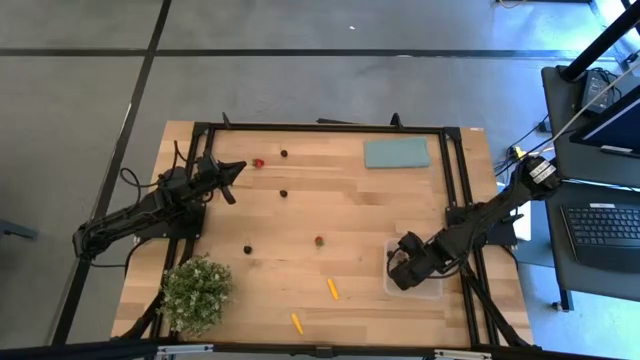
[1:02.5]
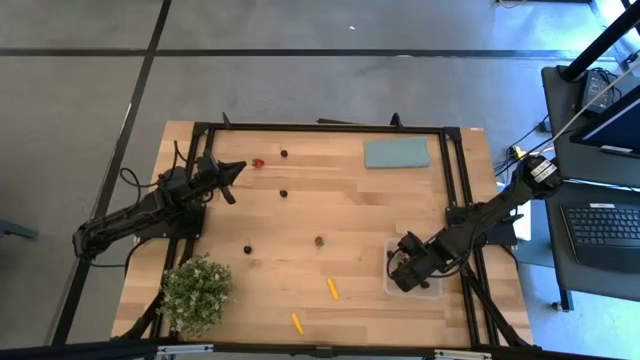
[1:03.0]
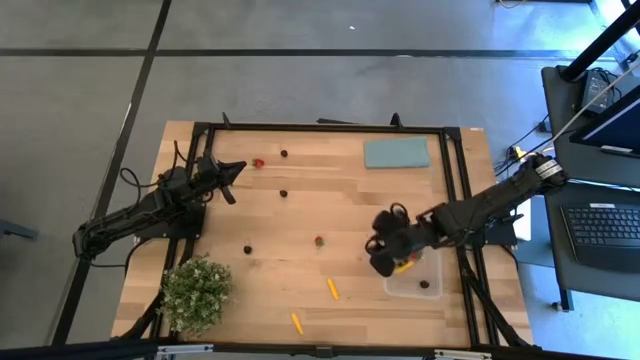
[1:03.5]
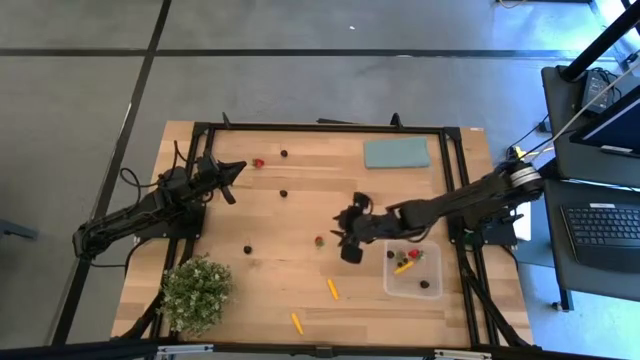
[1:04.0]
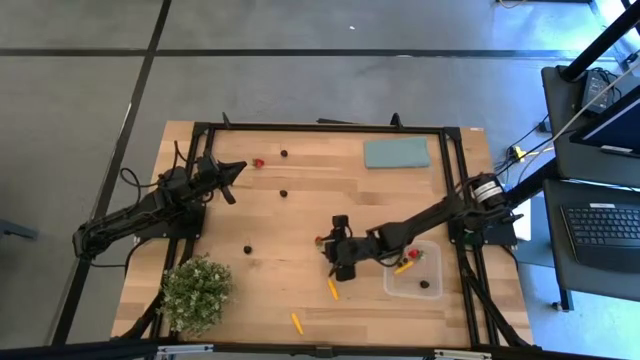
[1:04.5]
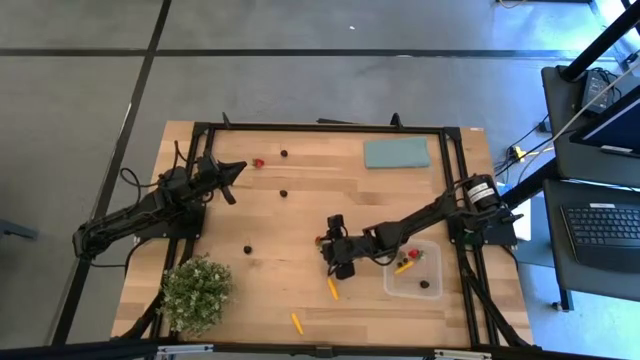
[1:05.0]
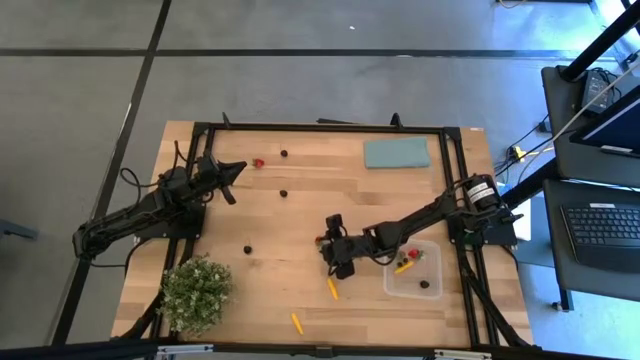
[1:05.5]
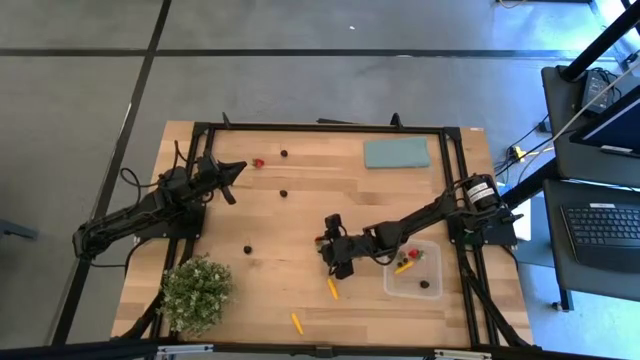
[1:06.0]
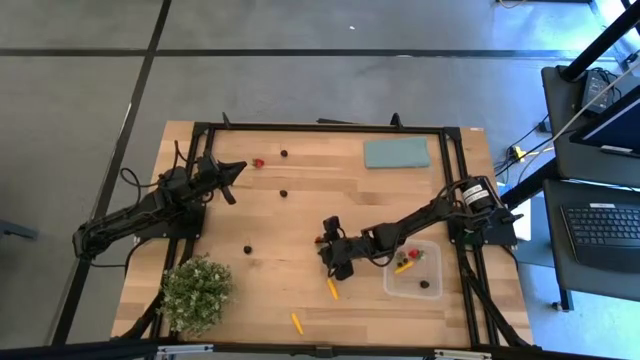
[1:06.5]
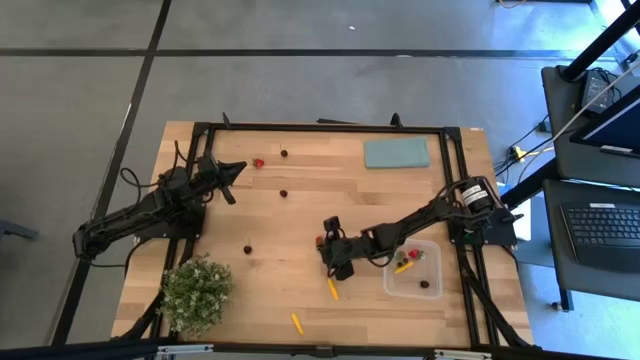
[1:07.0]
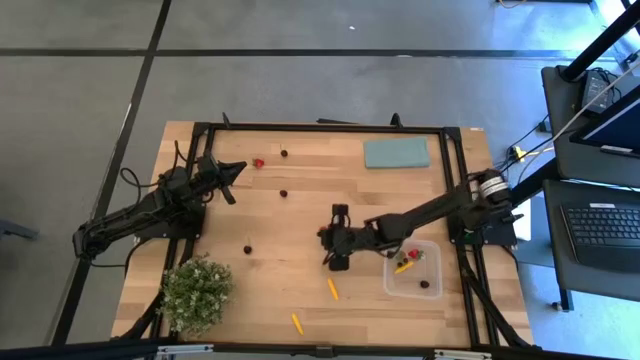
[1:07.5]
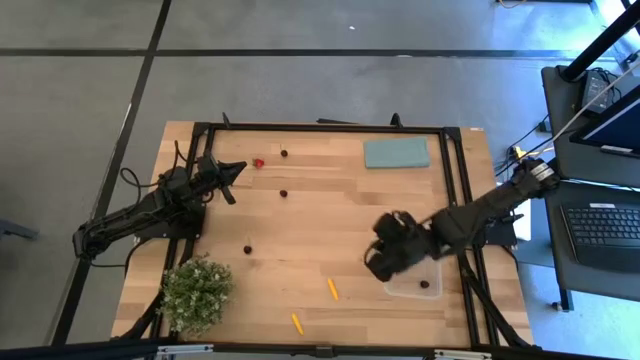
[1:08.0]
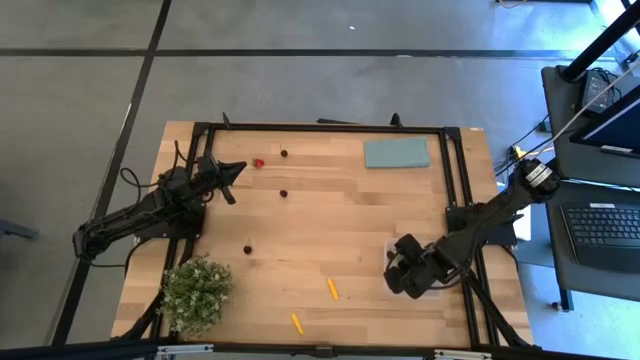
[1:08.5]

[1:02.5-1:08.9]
Task: Pick and placing Produce into tupperware
Put the bottom strawberry into the container

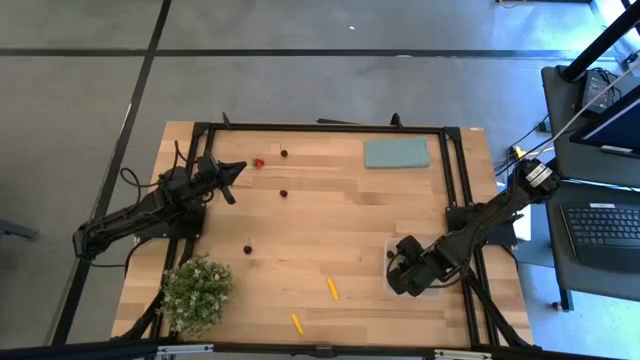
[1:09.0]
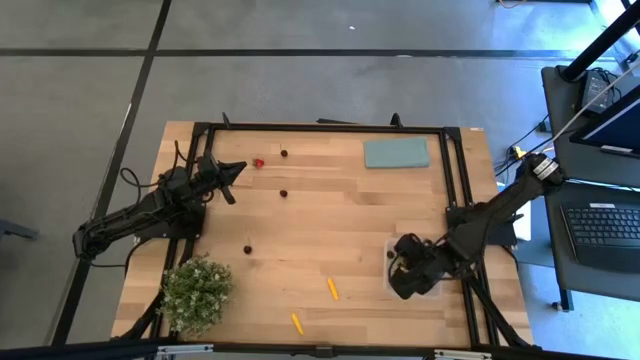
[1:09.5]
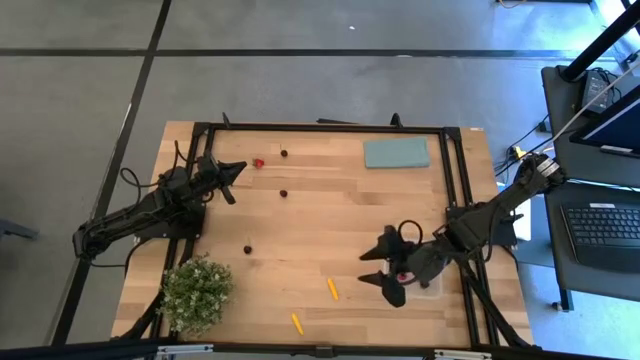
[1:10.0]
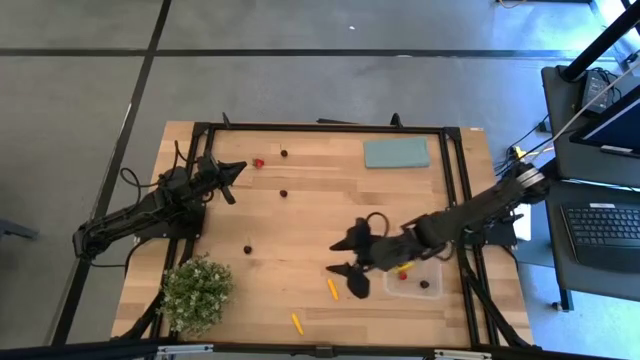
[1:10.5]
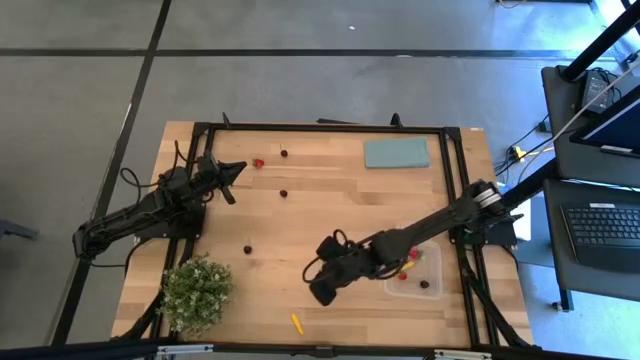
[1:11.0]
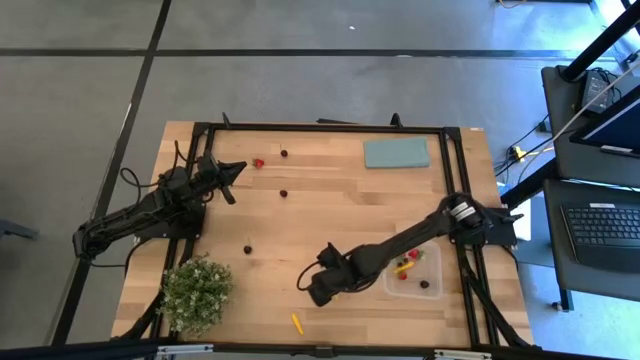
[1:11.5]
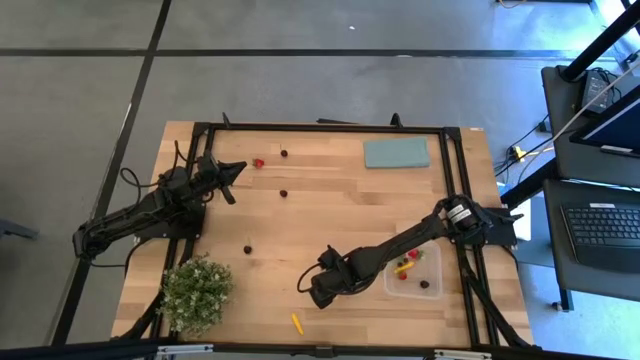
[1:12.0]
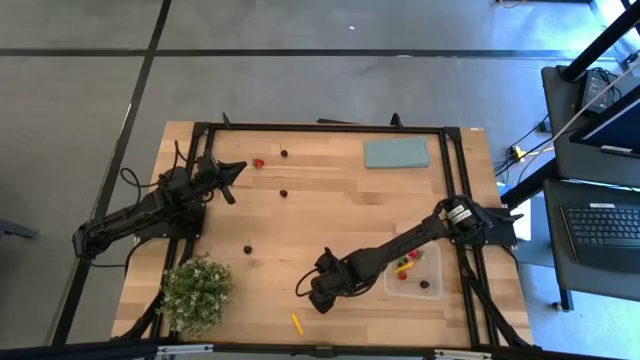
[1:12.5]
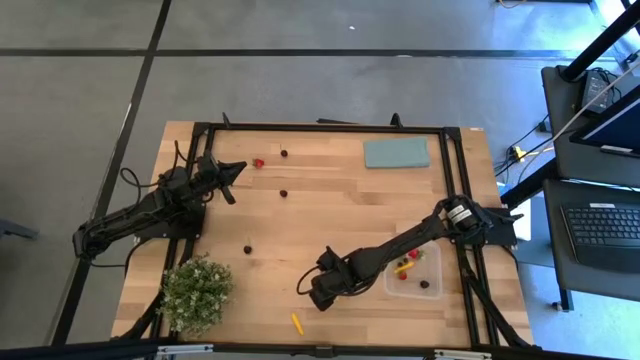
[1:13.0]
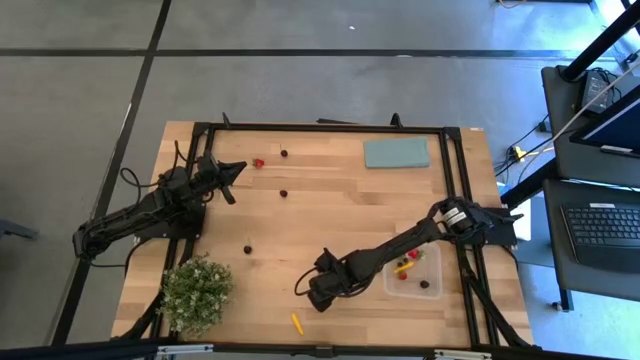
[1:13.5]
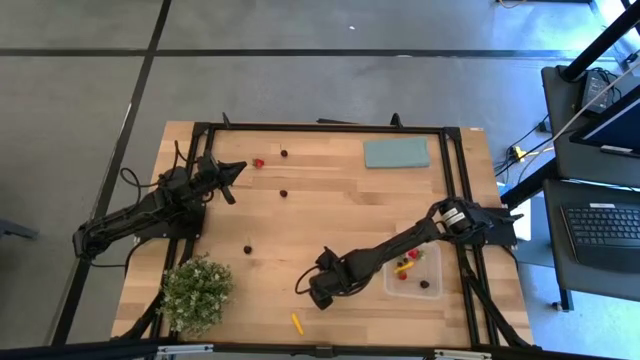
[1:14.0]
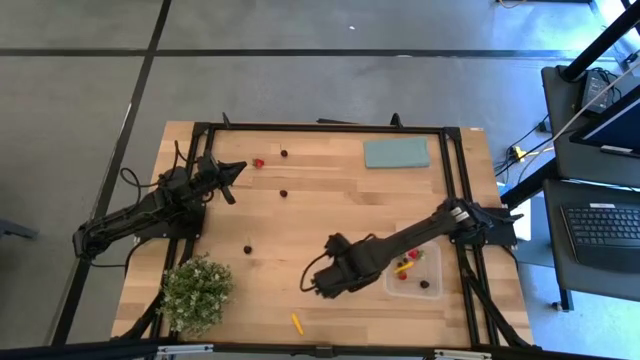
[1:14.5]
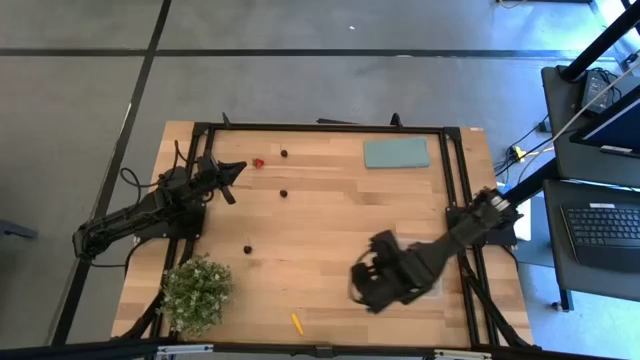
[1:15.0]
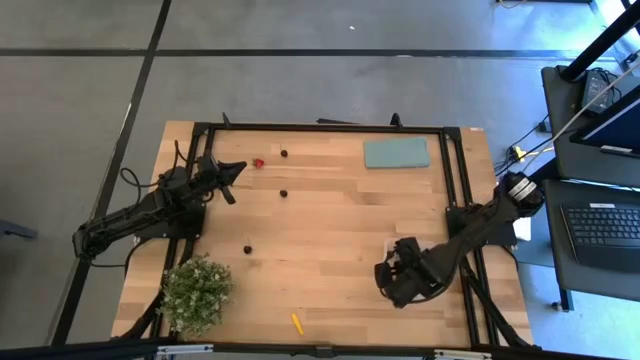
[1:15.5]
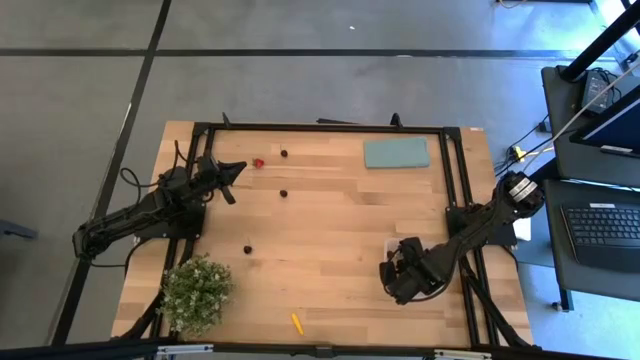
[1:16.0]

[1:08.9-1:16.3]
Put the top corn into the container

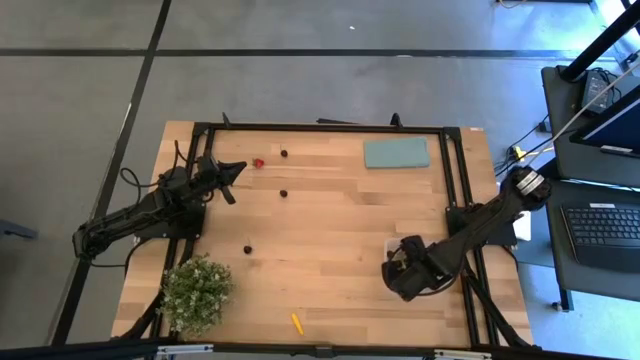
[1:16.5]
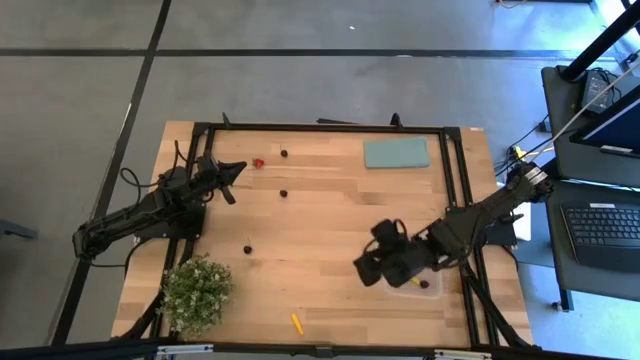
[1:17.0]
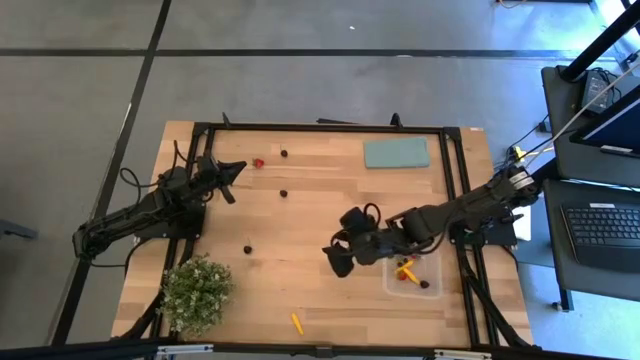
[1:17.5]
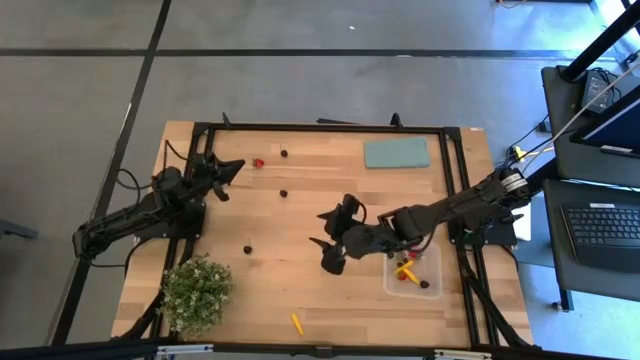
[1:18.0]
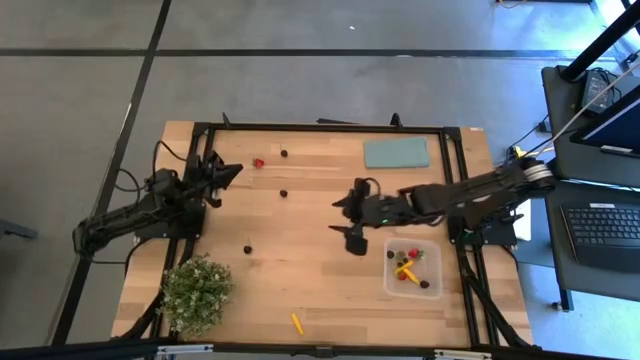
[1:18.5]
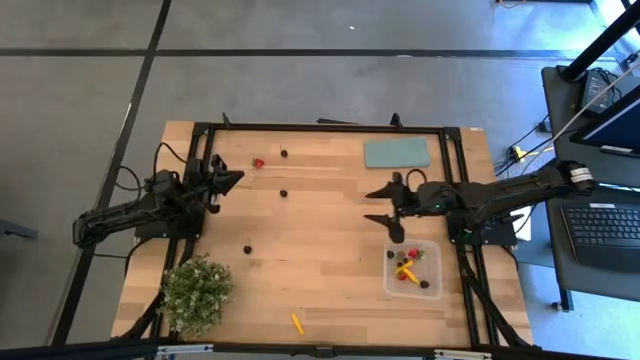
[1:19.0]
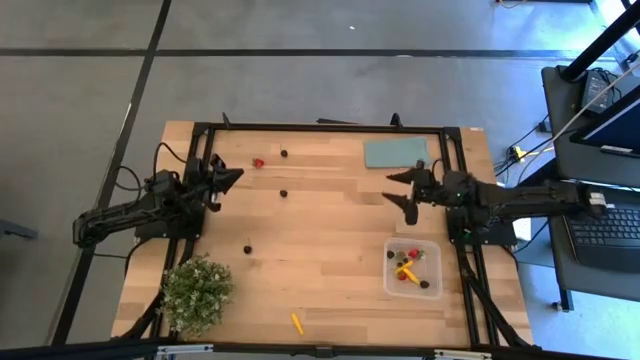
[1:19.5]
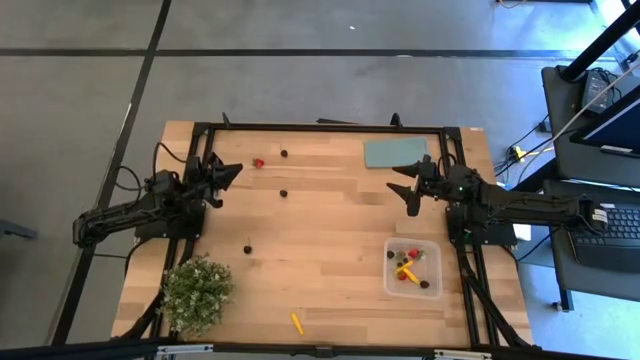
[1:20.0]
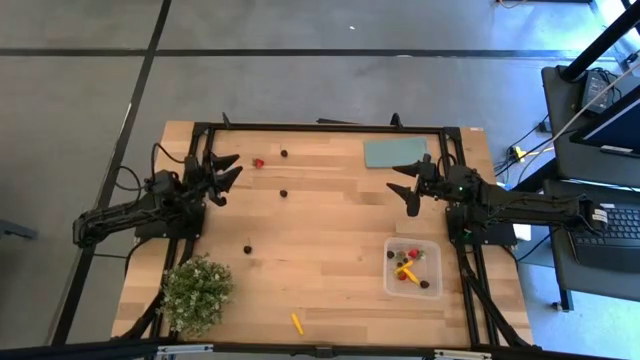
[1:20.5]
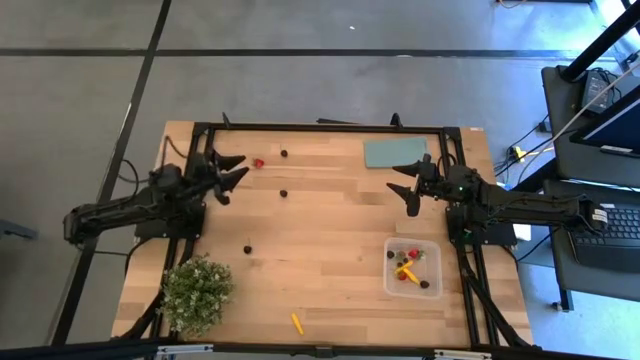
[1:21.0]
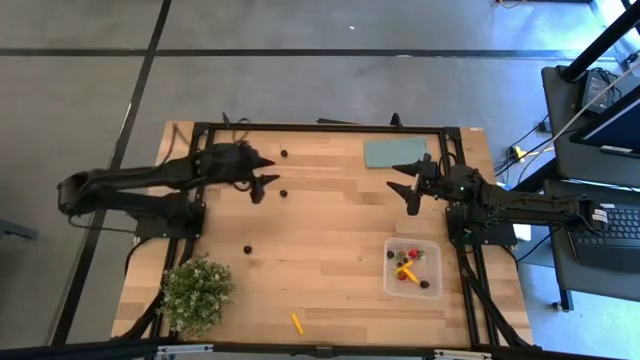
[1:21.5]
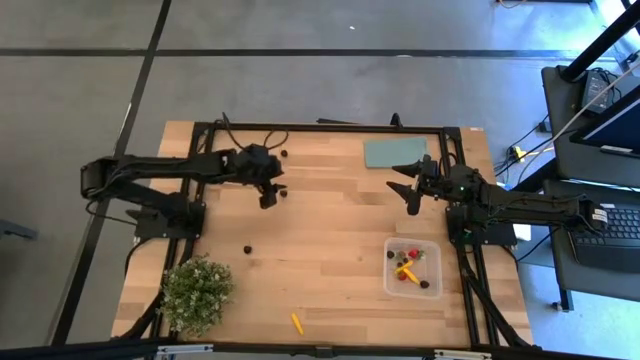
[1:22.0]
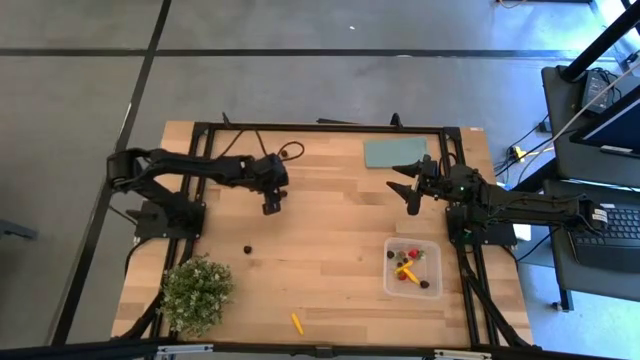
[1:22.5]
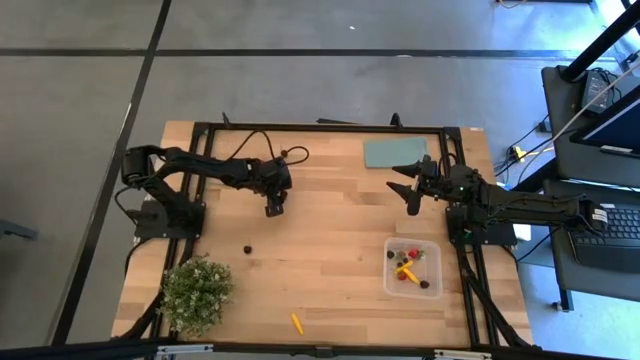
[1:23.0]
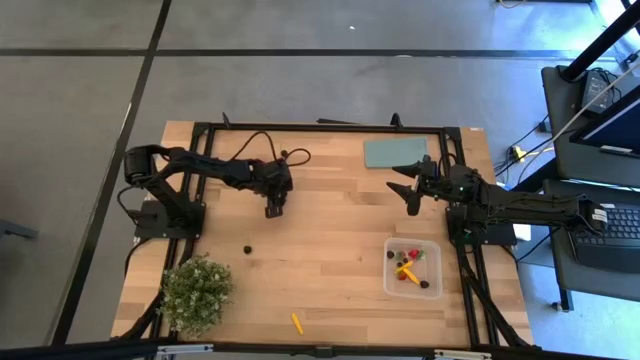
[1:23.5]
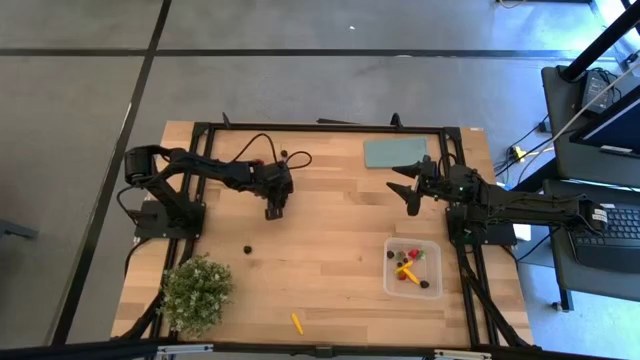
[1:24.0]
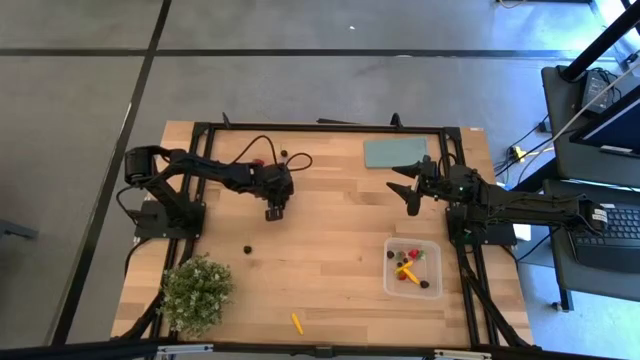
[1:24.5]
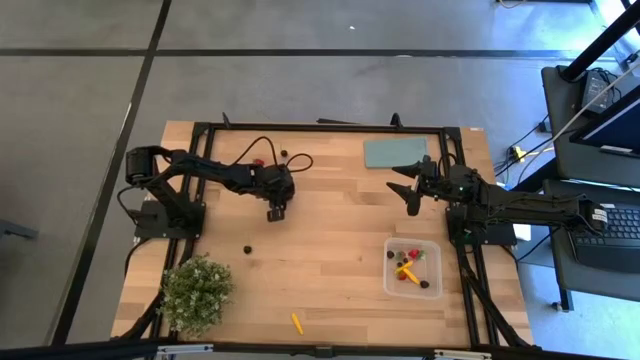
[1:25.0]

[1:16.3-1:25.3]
Put the blackberry into the container
